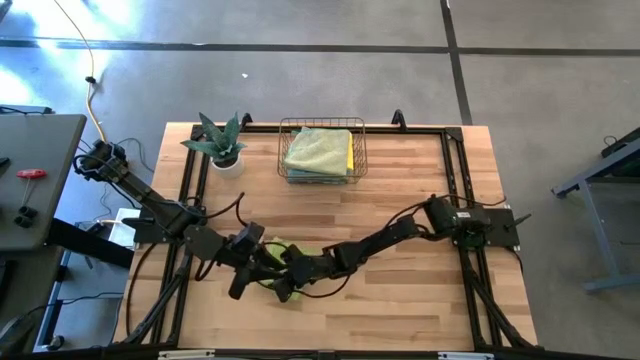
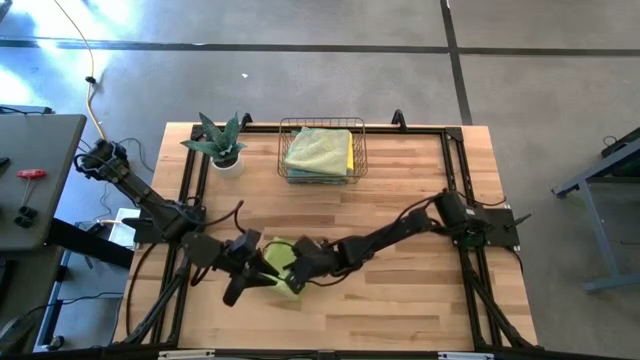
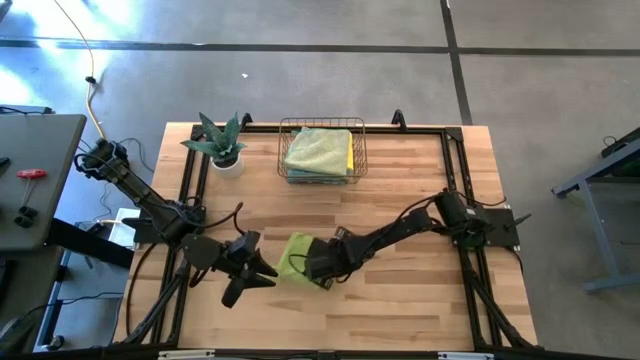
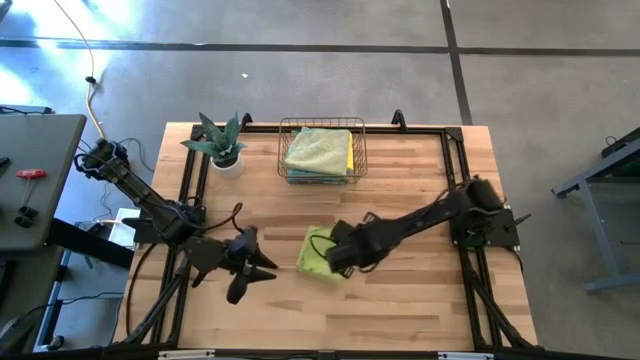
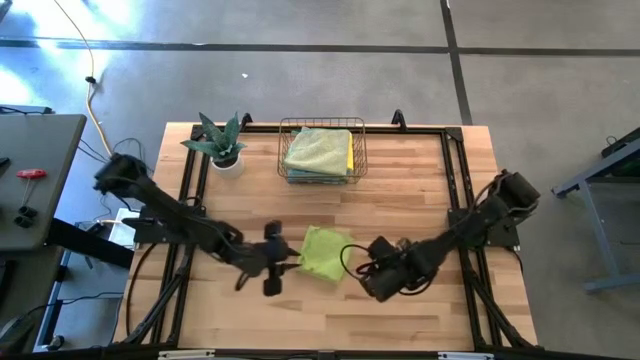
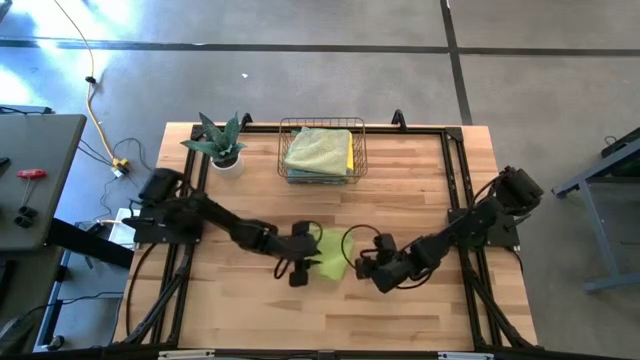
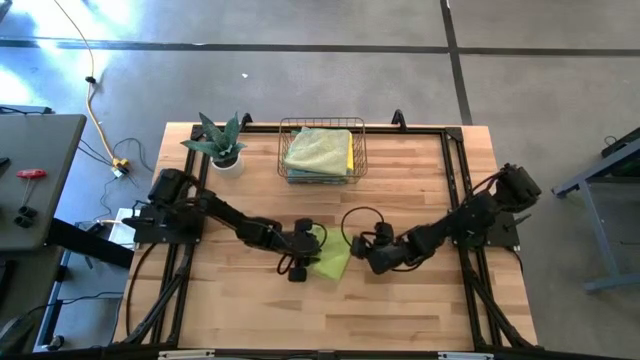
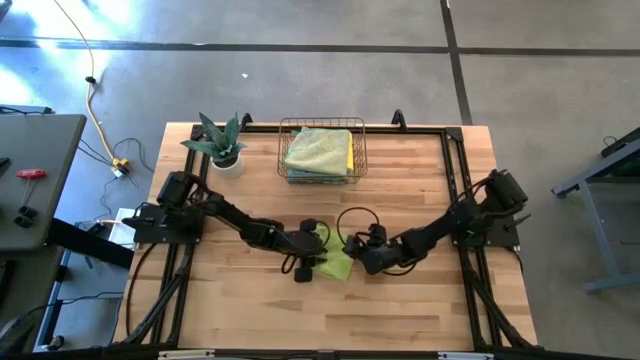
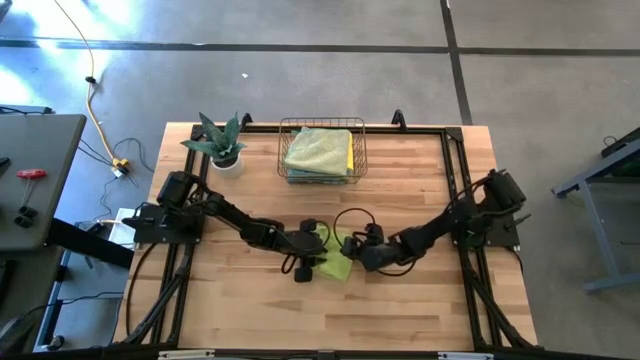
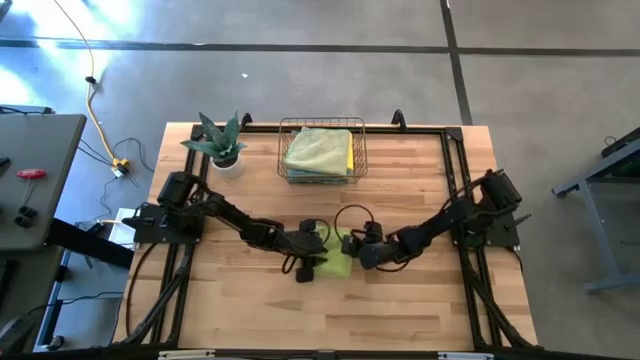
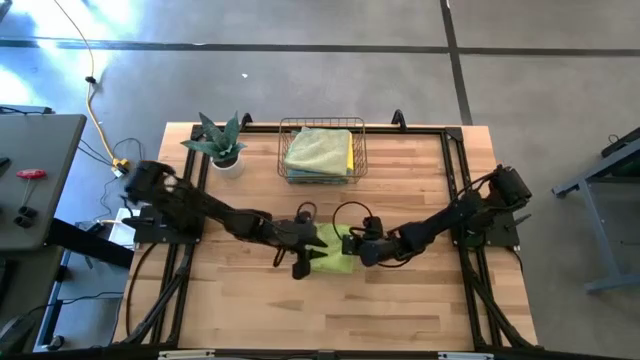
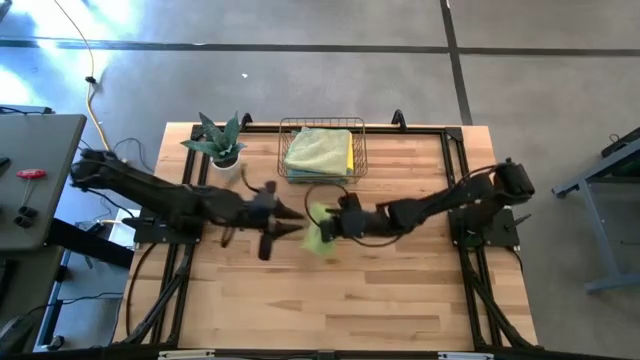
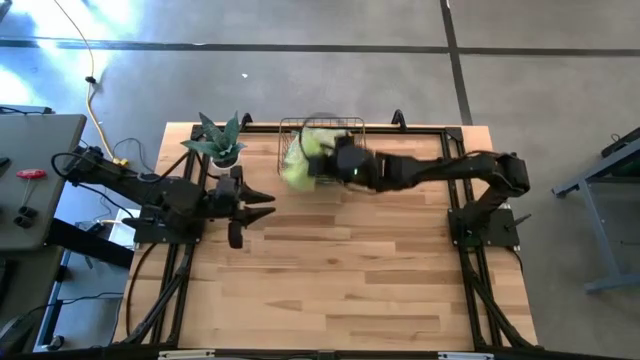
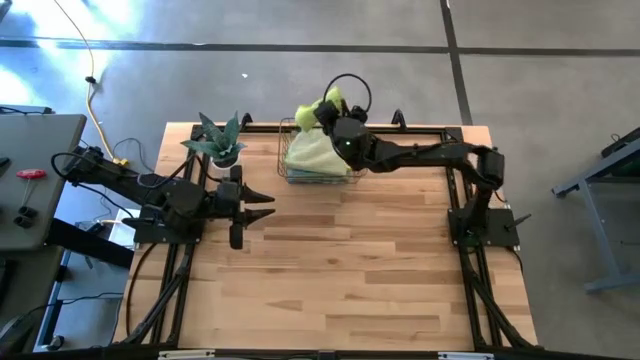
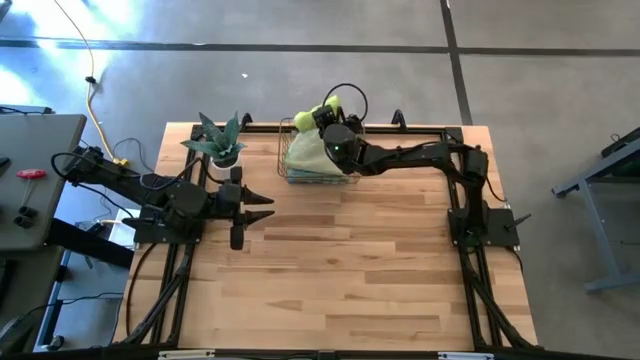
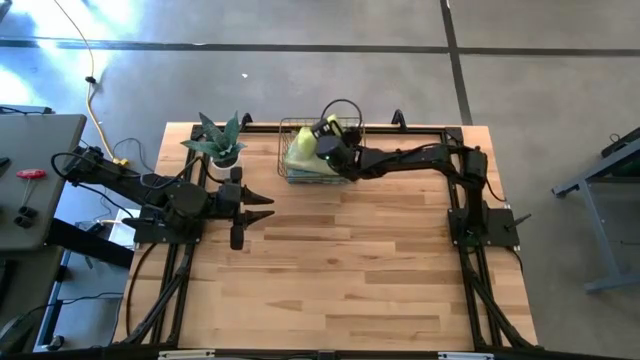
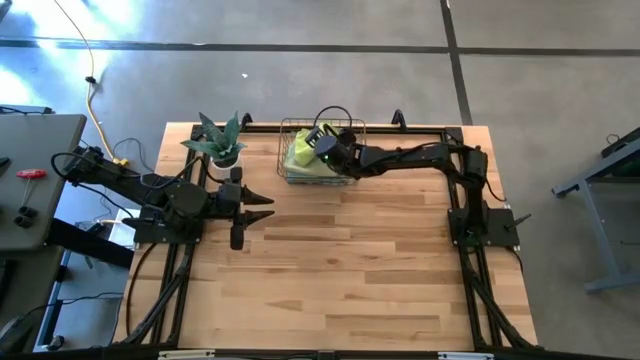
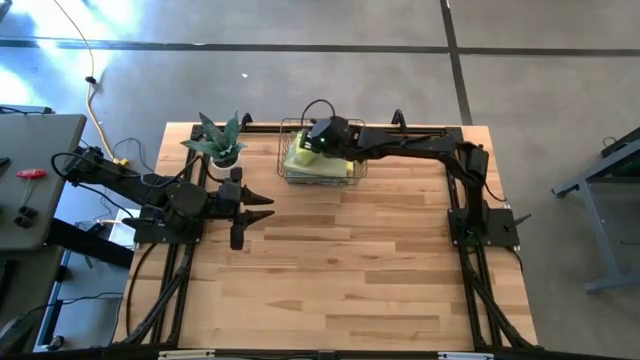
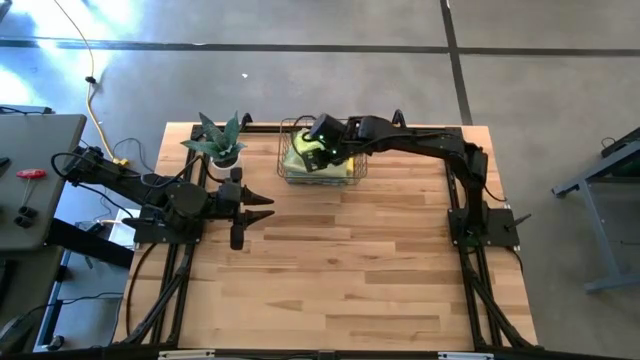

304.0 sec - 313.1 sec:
Task: Fold microfiber towels
Put the green microfiber cloth into the basket

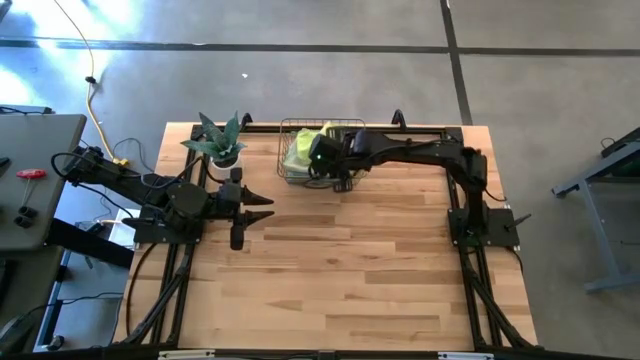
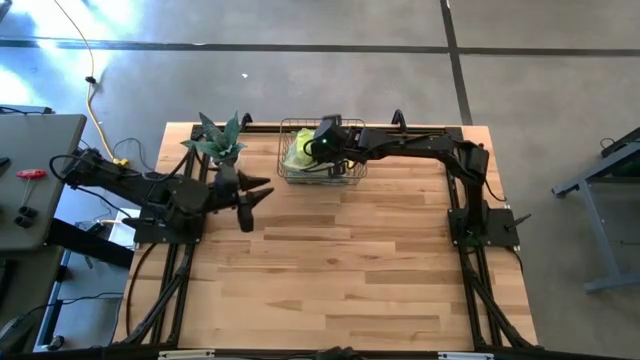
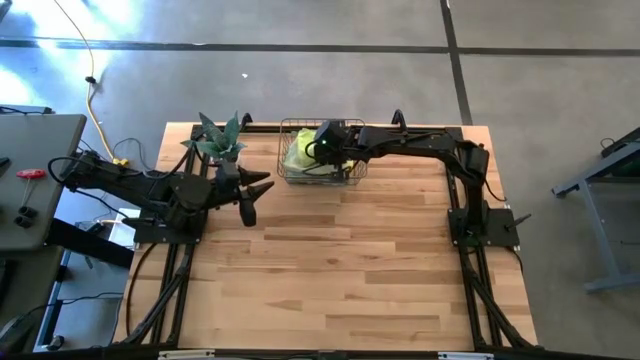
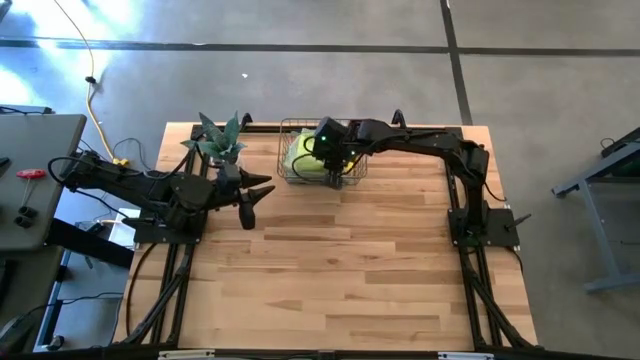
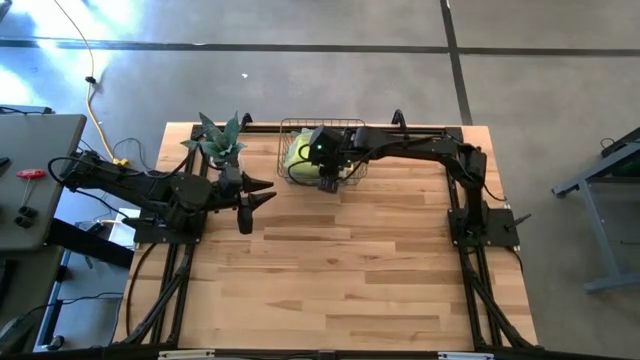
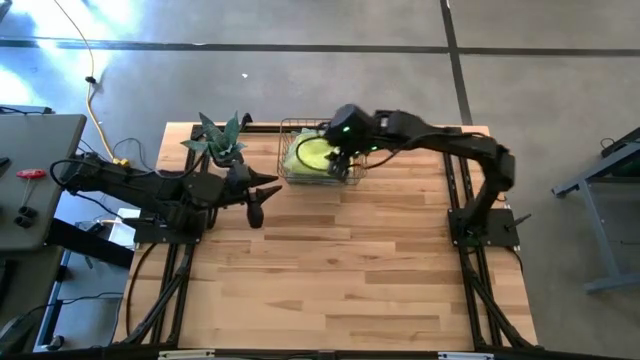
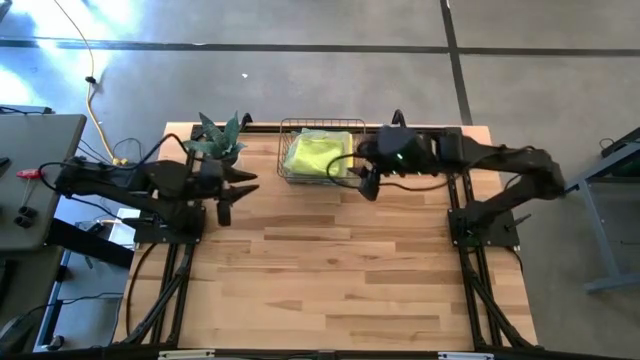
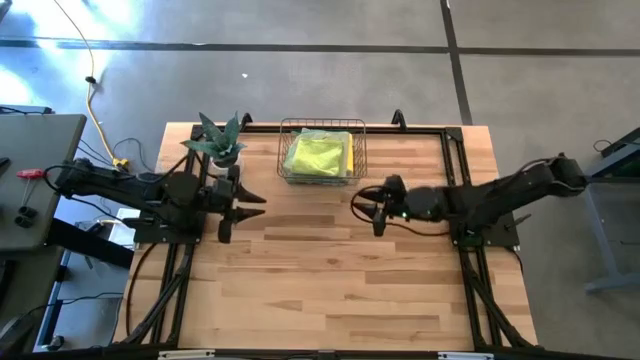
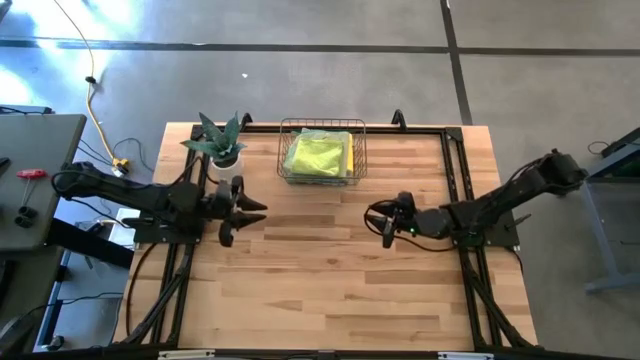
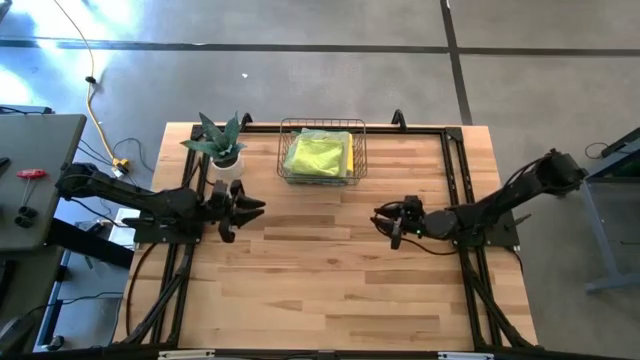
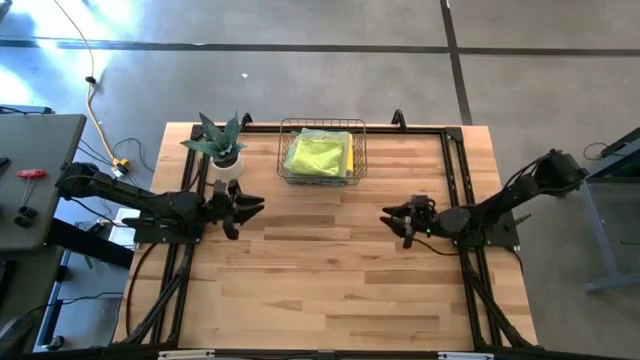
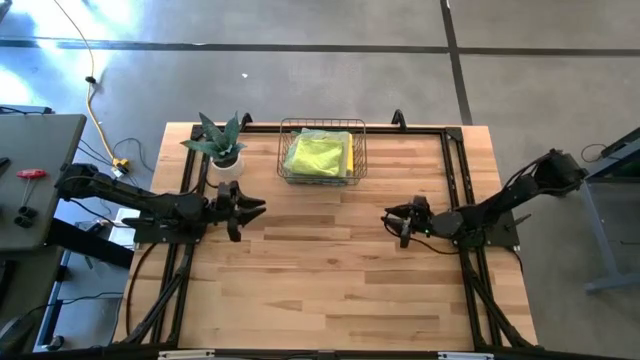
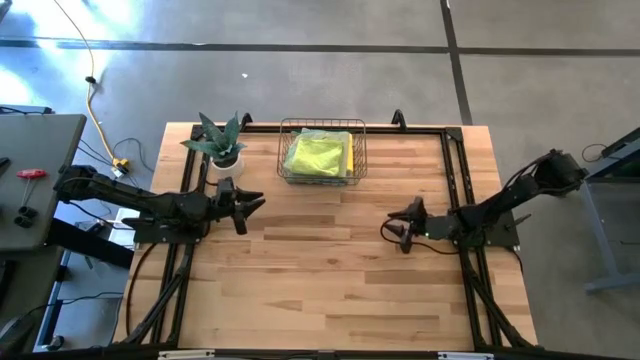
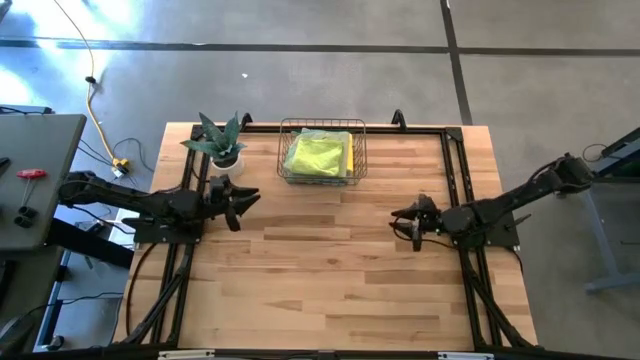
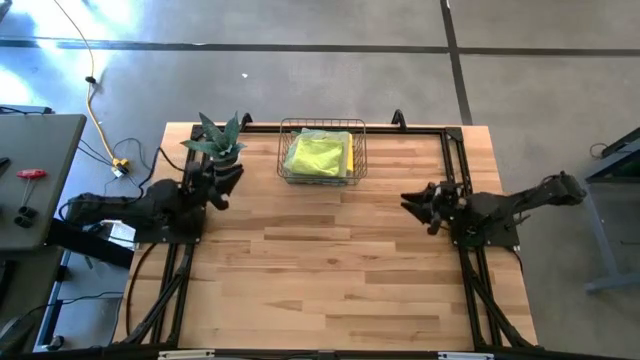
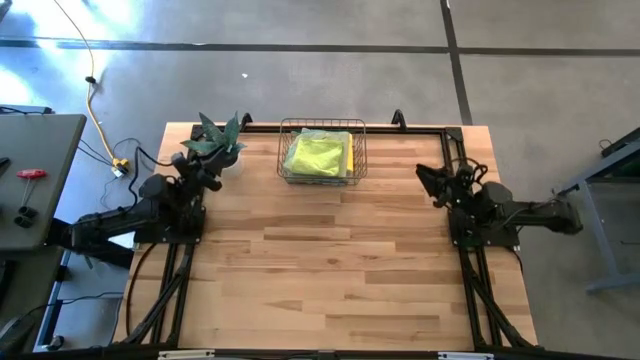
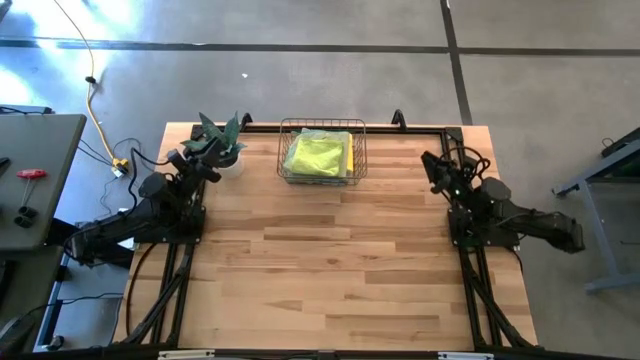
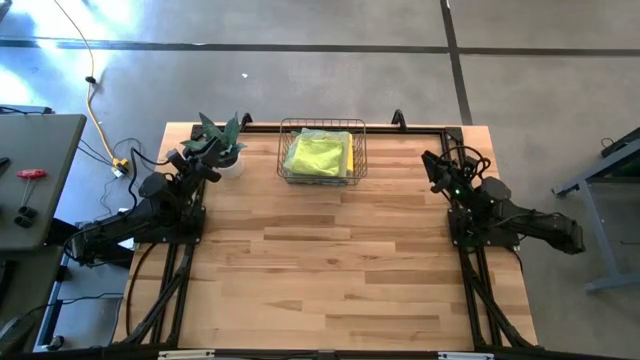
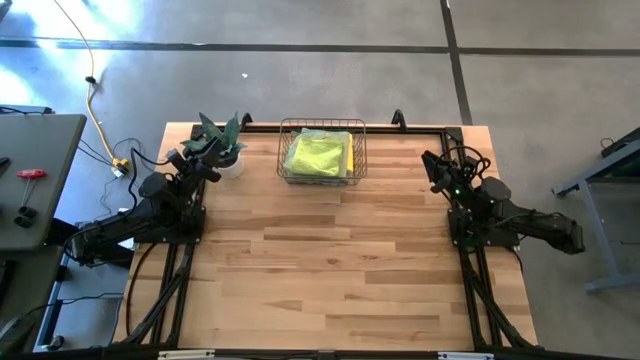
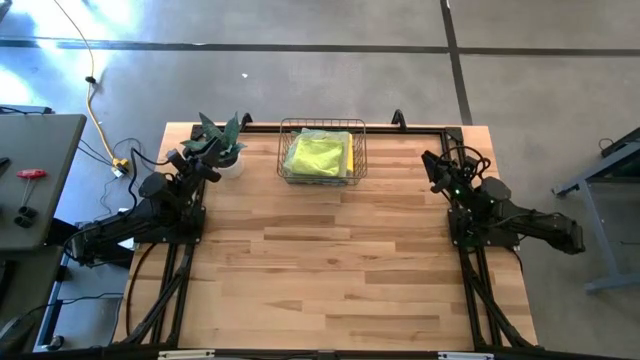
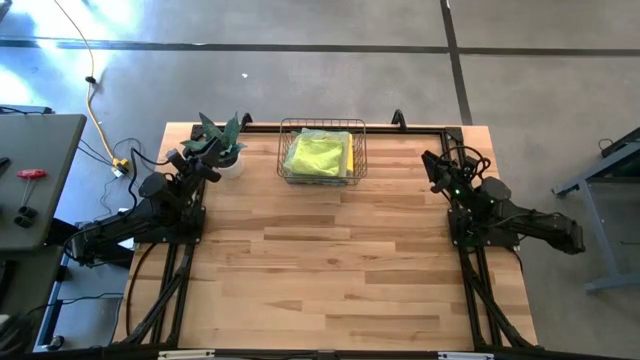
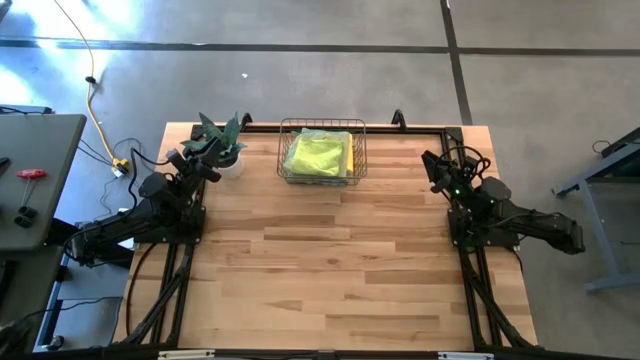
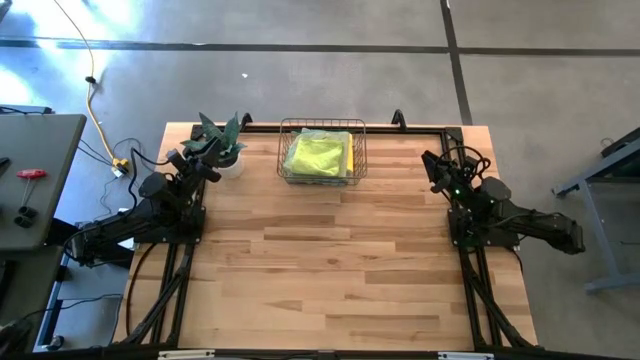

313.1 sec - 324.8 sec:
Return to Home Position

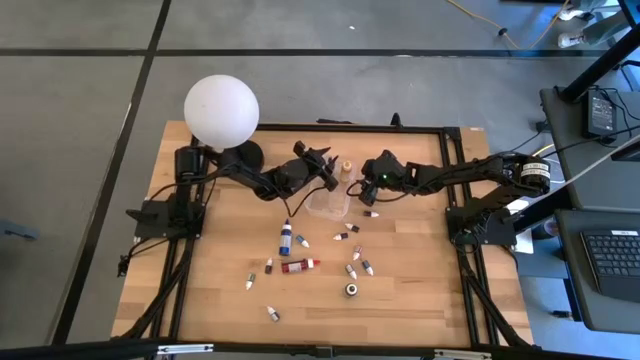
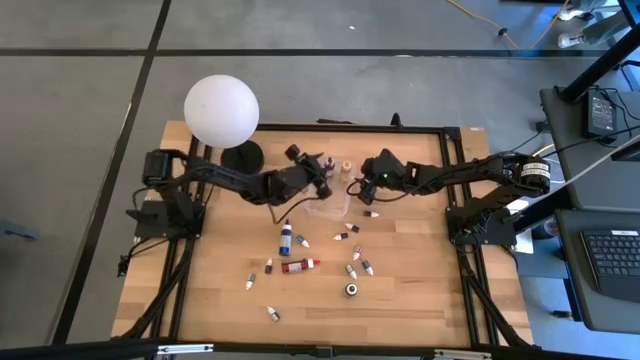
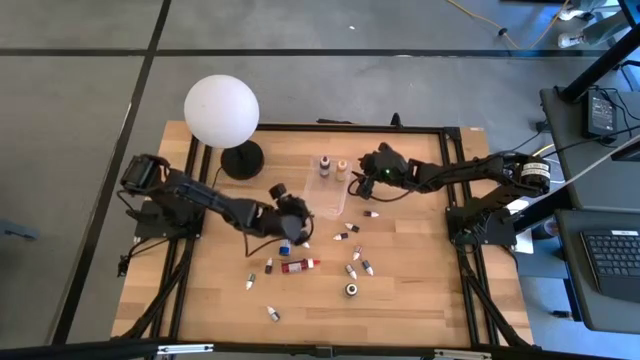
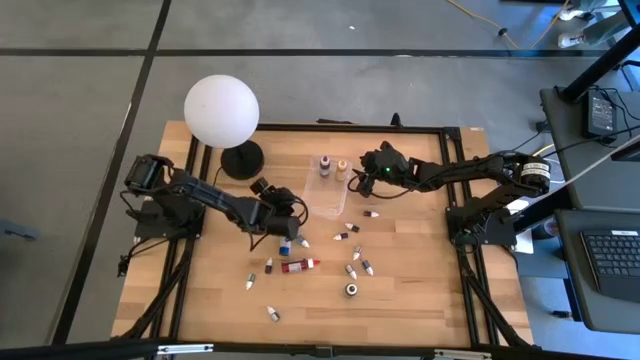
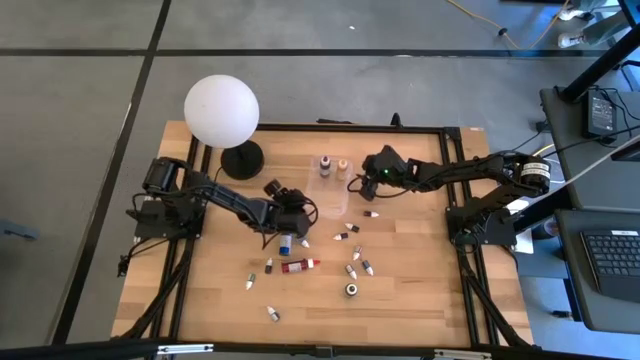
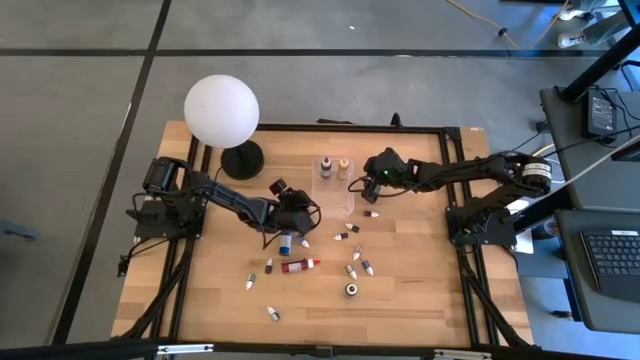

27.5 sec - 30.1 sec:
Task: Pick & Place food coloring
Adjust the transparent bin
